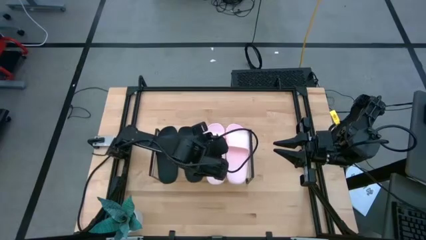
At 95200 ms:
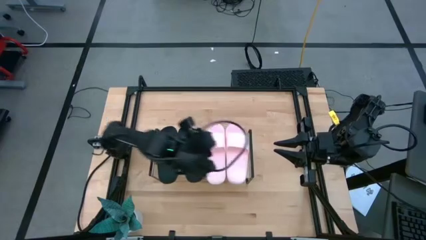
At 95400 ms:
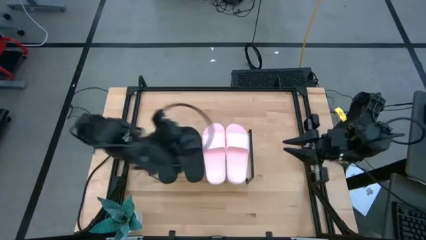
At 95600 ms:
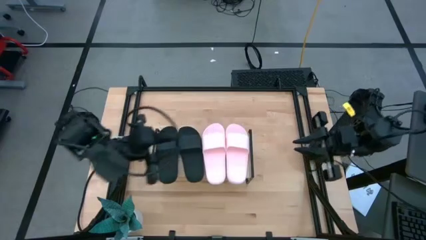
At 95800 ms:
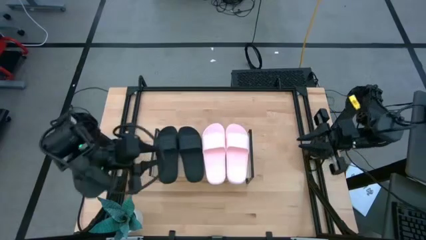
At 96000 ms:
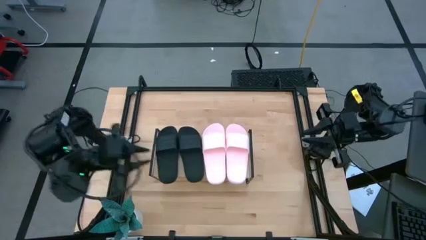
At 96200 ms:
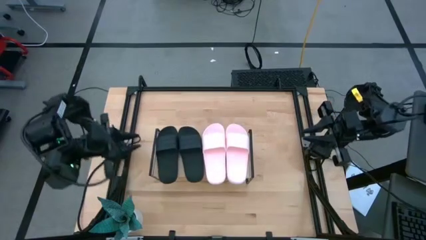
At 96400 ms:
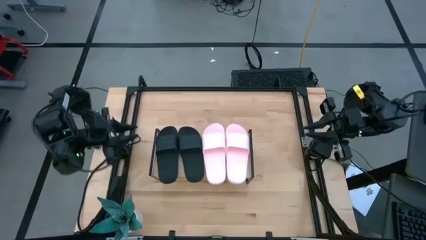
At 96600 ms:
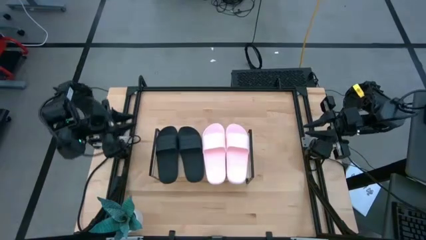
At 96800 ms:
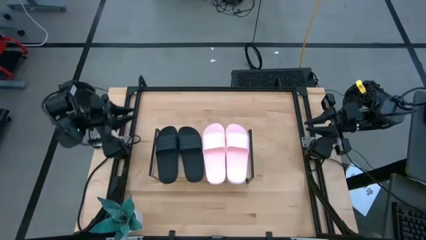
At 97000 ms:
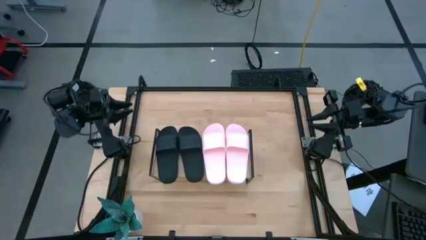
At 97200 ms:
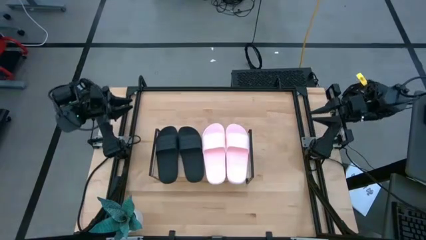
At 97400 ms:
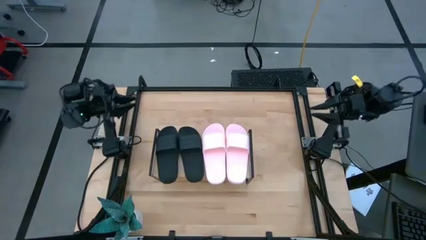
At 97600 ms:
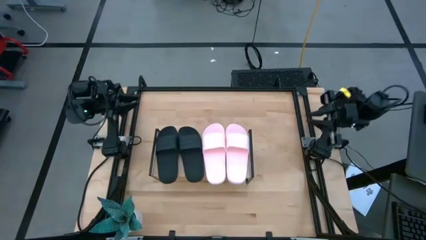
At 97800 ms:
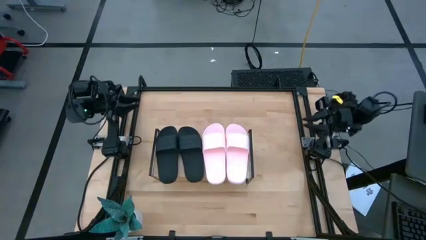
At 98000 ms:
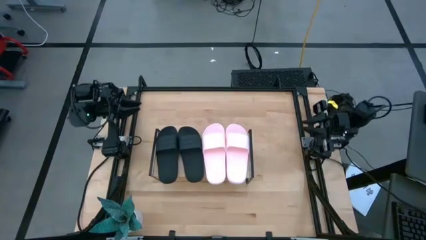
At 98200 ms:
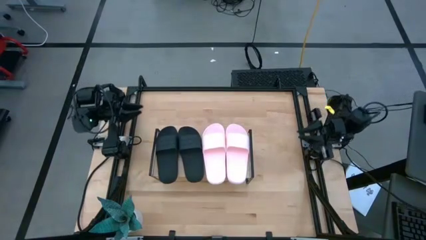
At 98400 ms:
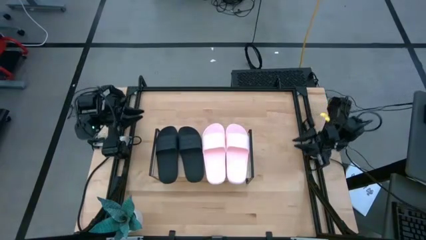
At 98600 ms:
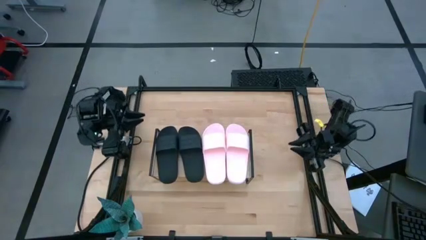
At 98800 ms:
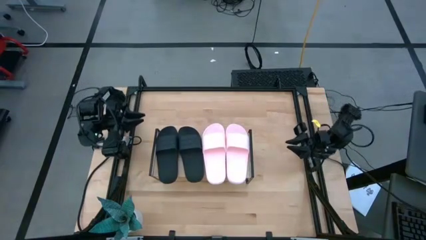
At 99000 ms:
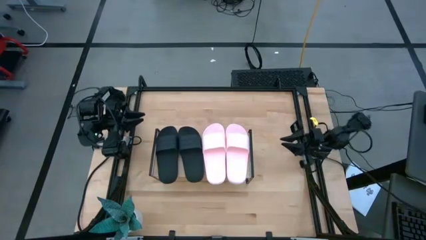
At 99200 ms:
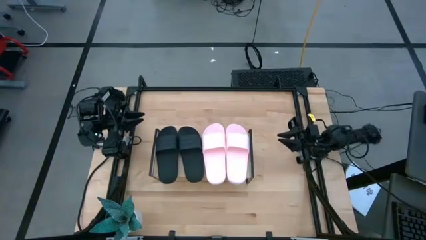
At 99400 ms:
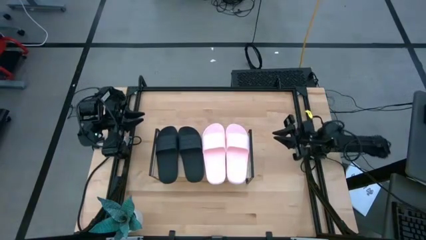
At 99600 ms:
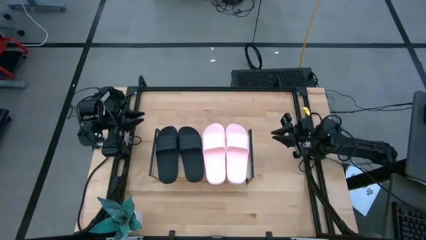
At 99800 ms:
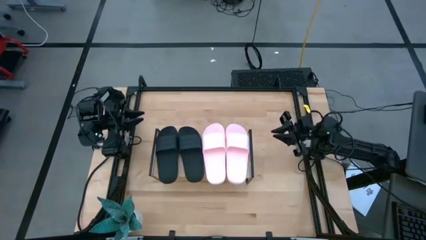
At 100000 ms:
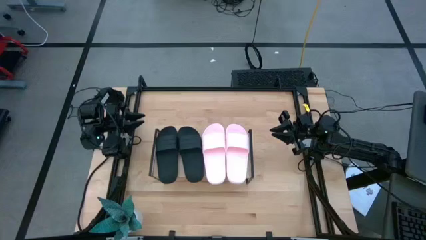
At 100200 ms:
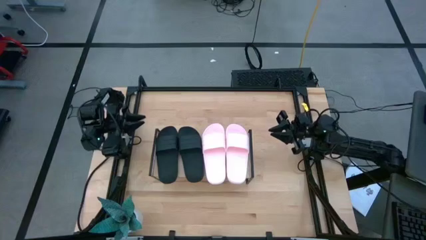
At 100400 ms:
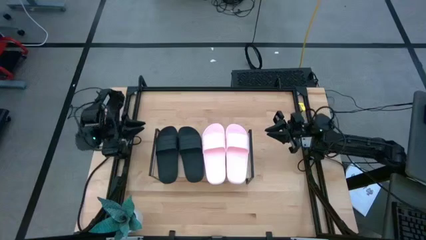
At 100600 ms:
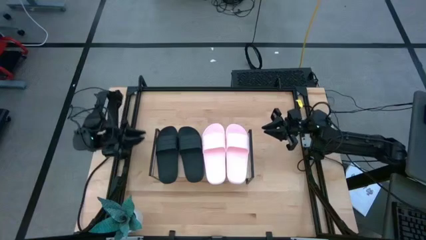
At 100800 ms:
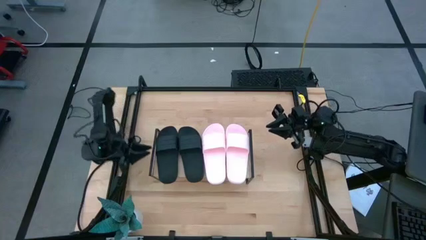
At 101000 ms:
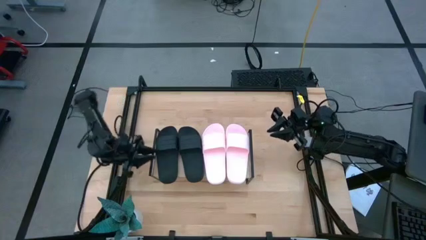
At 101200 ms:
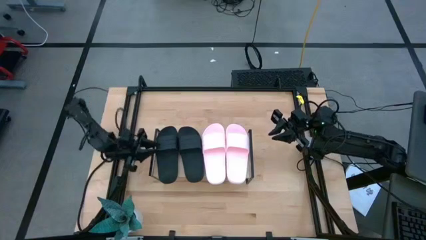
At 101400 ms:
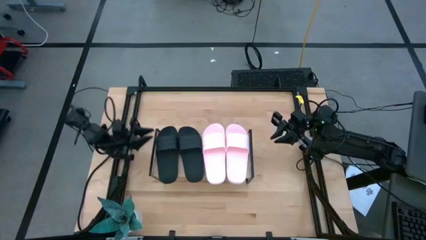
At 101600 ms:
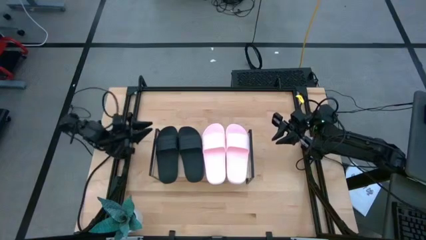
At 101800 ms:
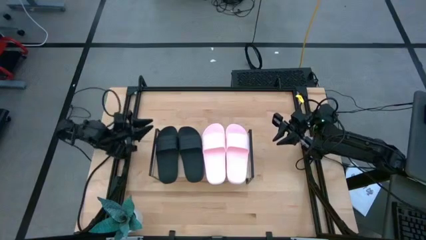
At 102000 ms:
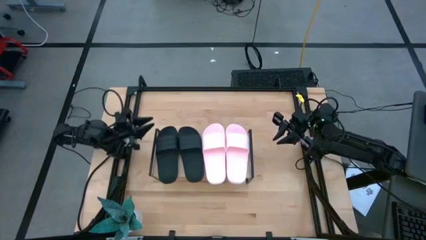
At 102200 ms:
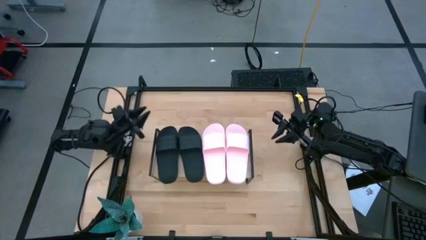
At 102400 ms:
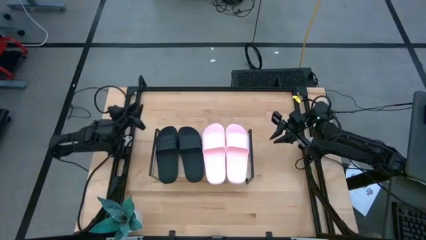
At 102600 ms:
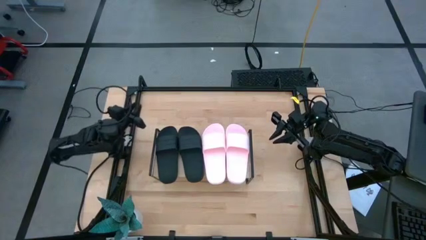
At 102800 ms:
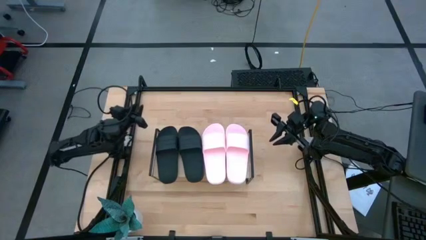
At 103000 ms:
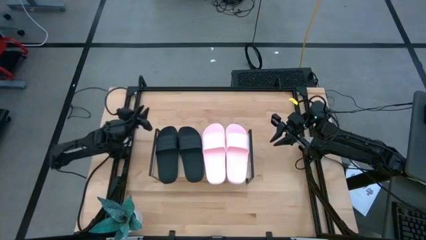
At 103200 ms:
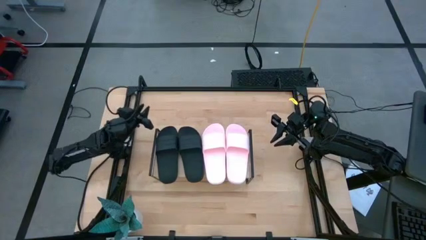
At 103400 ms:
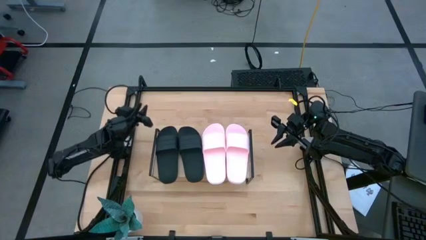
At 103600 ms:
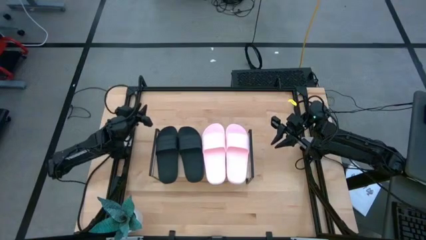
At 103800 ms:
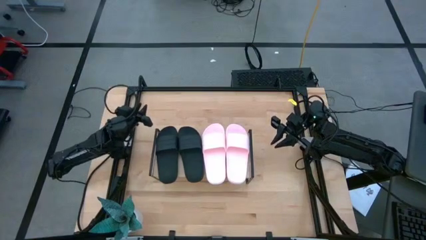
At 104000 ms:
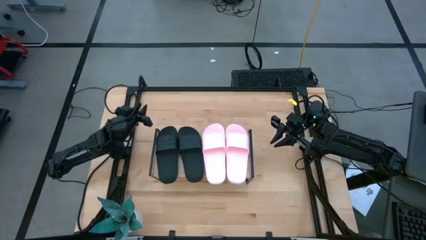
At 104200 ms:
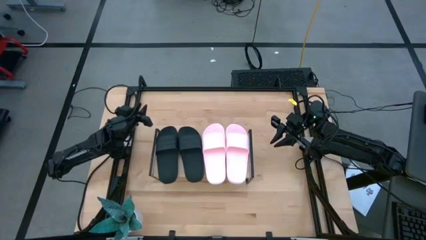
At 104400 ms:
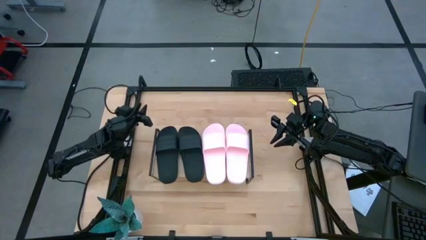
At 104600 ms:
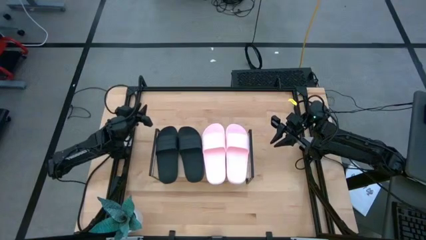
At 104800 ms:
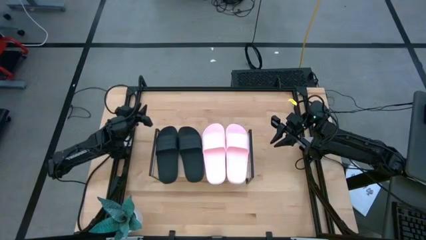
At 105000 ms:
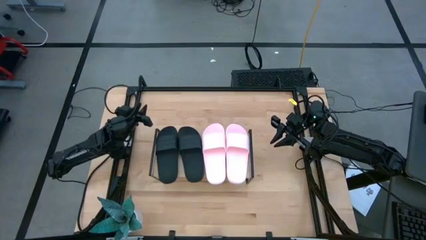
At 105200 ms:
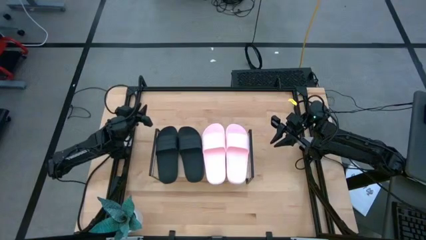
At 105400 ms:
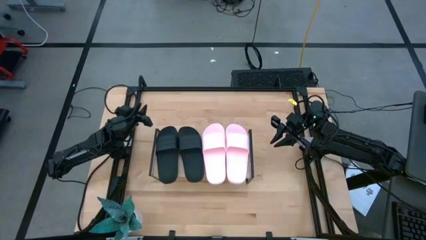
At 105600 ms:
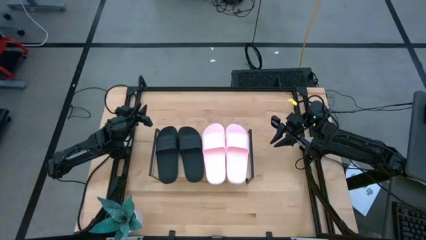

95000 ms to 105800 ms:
Task: Pick and place slides into the shelf
Return to Home Position
